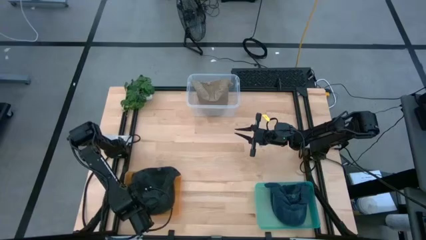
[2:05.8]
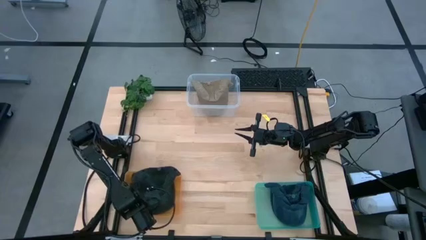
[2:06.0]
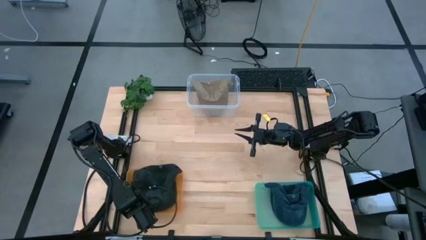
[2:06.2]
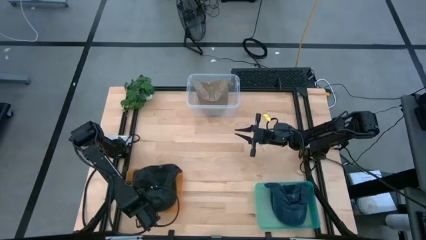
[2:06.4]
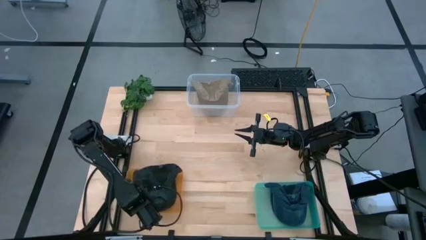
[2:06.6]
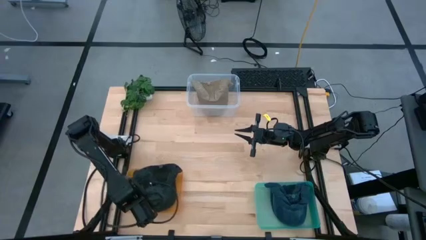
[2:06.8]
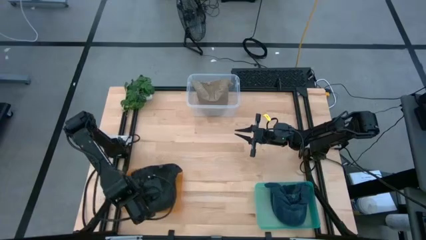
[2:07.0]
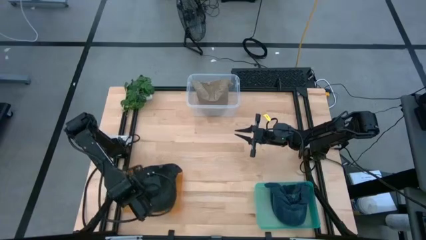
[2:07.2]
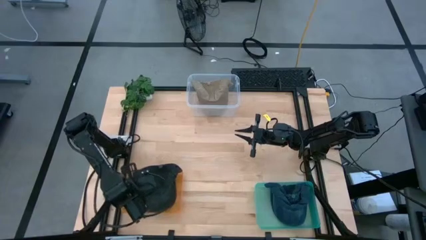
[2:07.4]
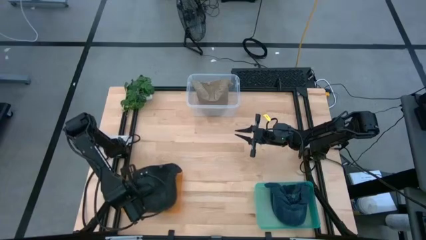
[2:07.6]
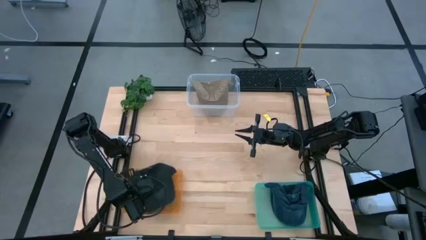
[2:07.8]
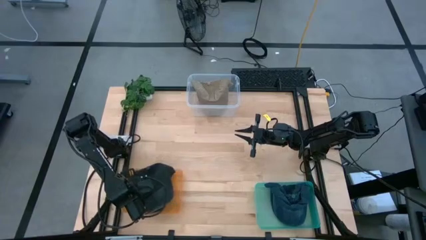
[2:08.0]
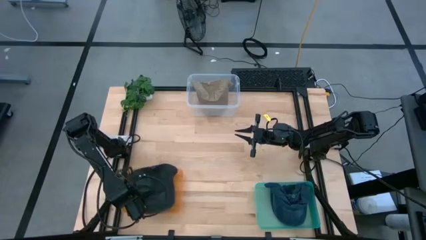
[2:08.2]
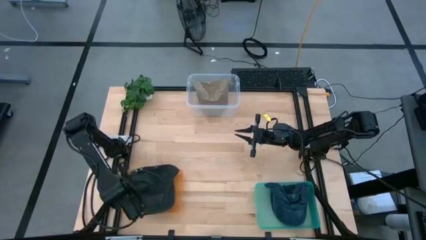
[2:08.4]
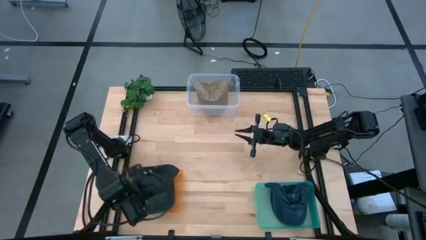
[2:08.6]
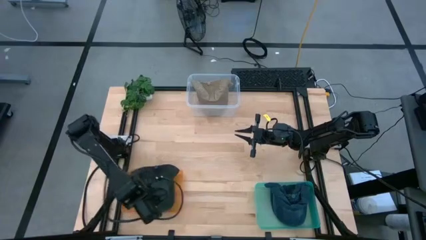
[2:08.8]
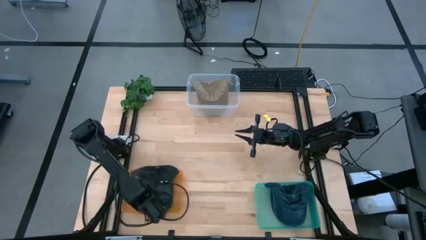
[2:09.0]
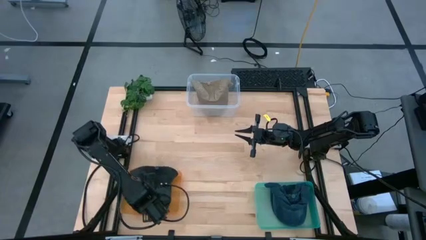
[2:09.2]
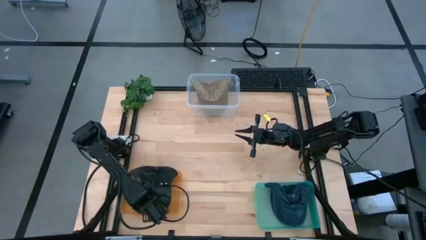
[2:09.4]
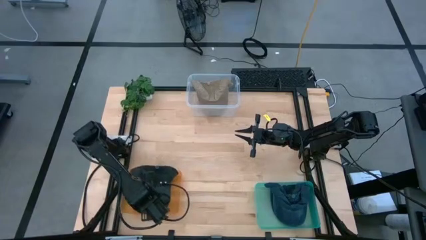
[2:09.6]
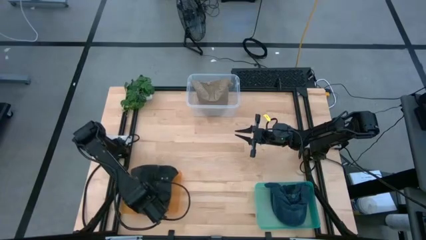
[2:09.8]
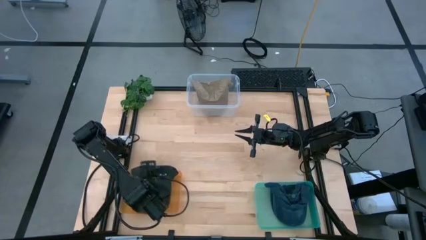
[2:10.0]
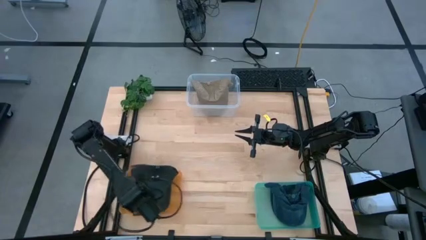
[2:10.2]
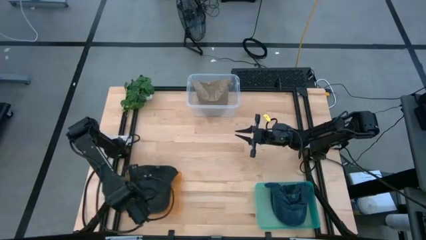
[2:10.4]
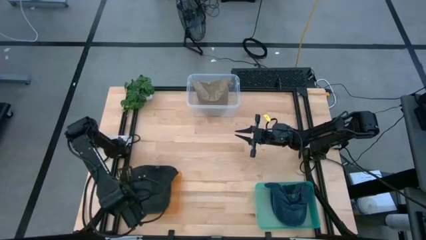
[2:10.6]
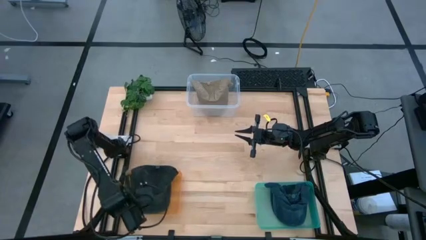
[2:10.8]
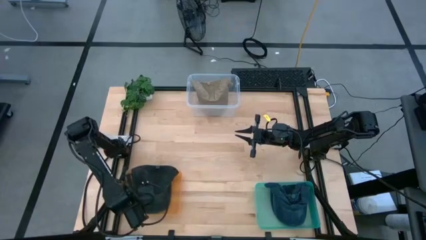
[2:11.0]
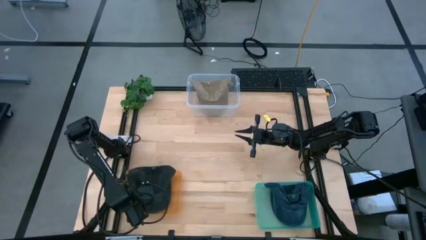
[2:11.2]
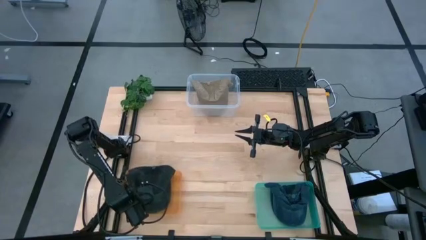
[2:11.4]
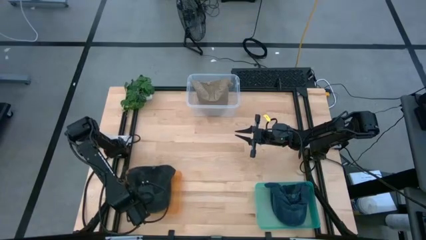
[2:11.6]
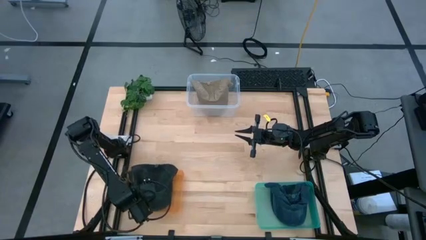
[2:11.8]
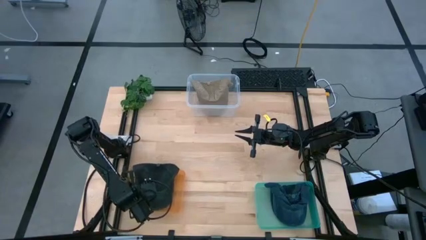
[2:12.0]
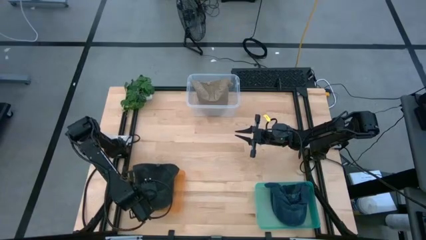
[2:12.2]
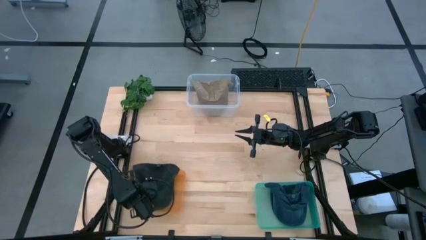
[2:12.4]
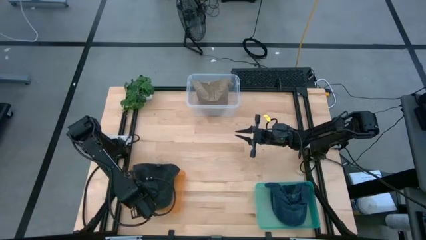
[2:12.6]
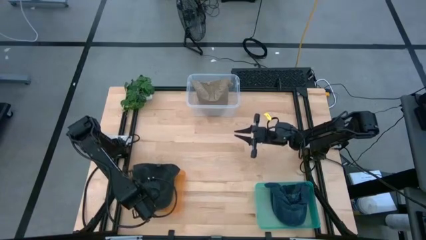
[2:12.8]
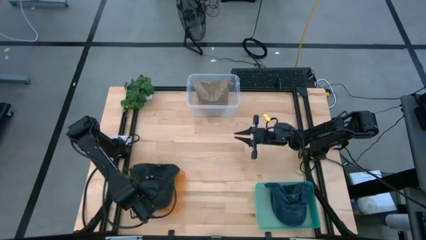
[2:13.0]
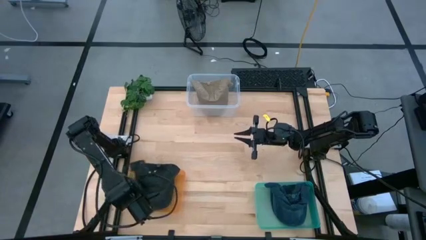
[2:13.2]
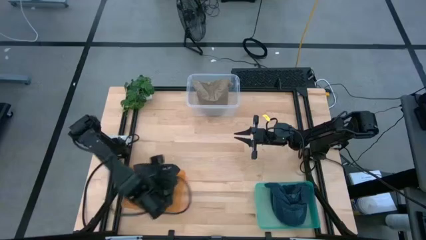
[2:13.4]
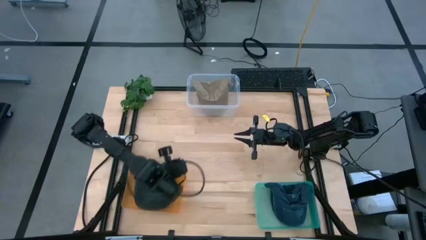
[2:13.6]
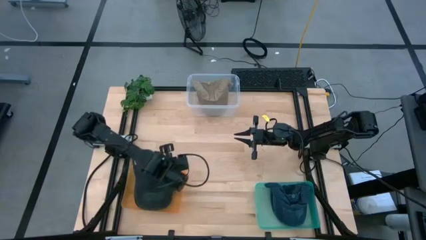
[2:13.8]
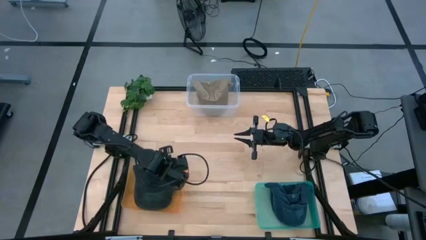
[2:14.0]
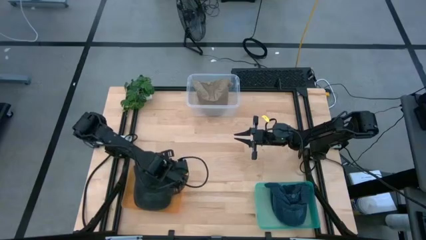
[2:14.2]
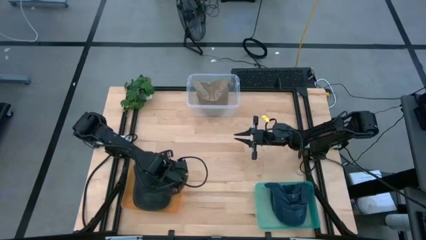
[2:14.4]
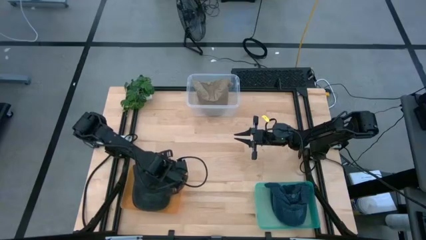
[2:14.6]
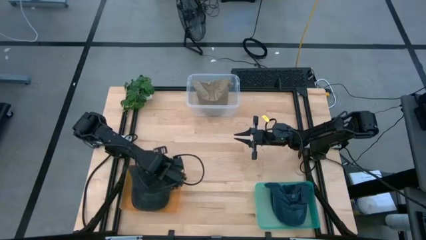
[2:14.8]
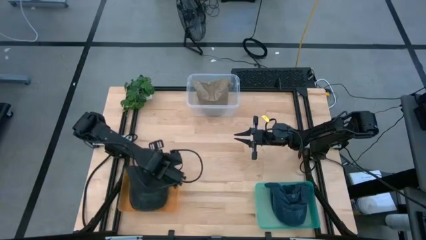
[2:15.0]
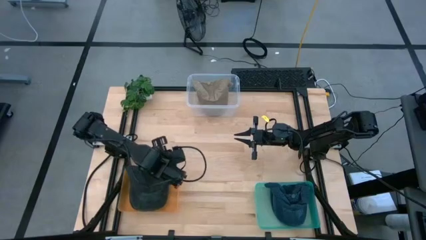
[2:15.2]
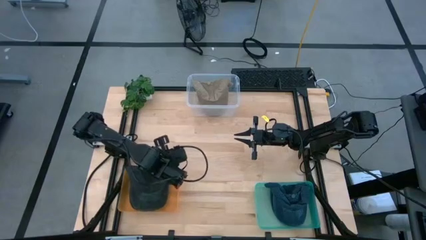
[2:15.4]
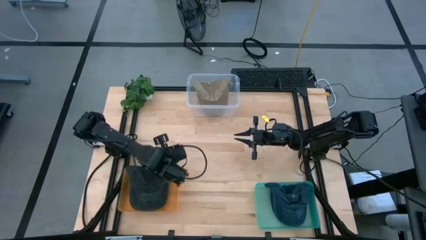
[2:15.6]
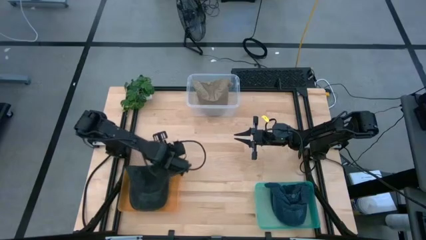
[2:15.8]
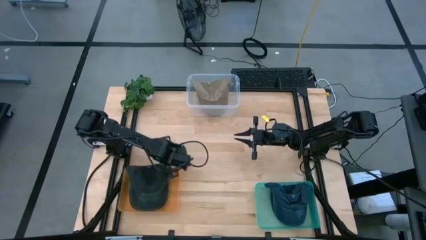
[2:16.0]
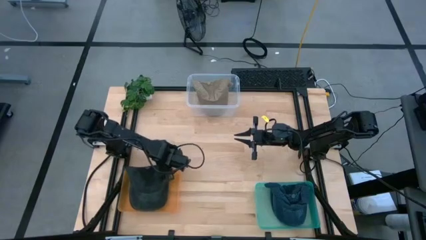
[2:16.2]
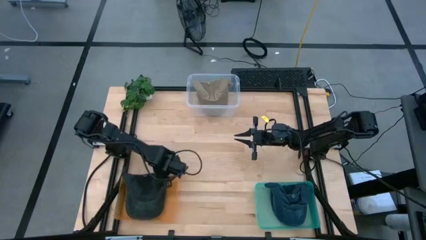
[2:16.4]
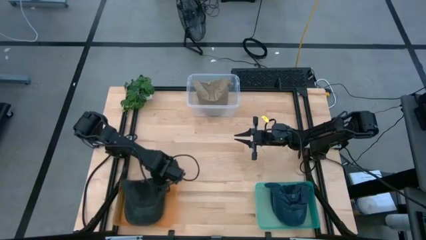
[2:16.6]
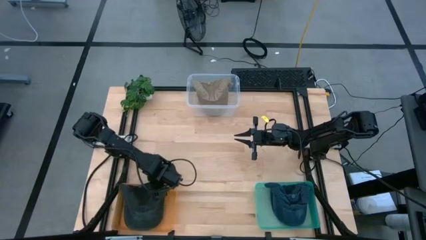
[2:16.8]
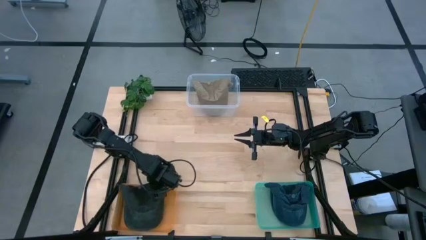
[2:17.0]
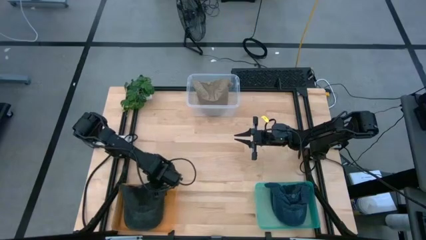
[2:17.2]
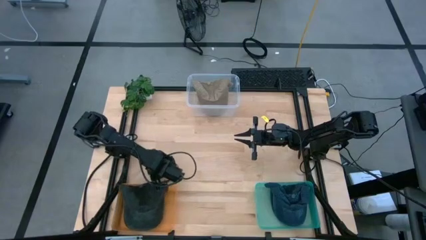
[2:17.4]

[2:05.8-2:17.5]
Task: Pick & Place hat
Put the black cap into the orange bin

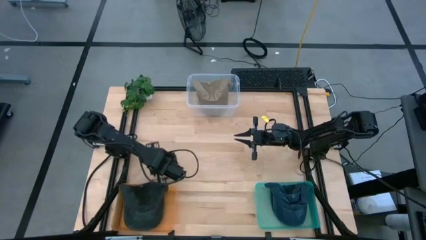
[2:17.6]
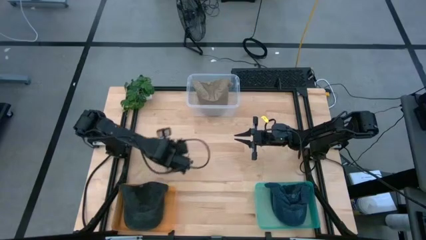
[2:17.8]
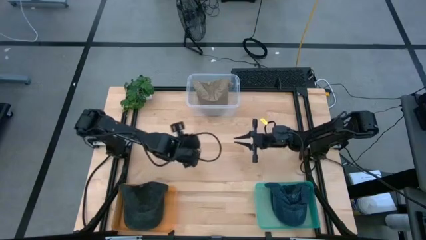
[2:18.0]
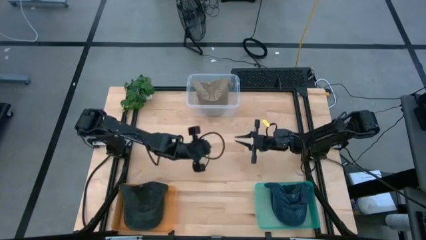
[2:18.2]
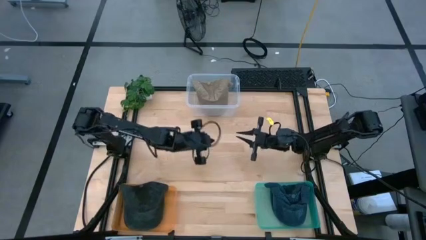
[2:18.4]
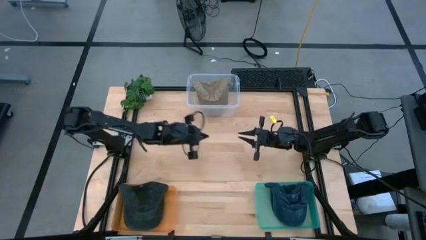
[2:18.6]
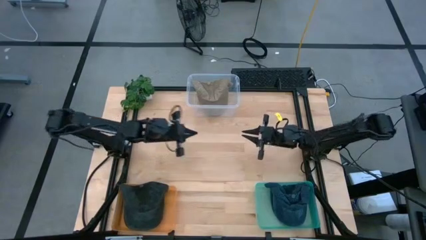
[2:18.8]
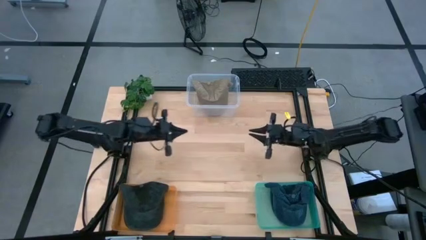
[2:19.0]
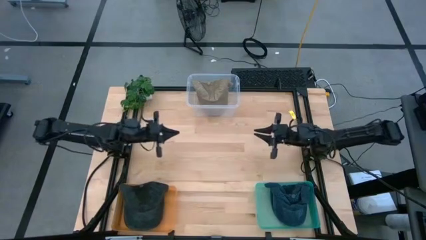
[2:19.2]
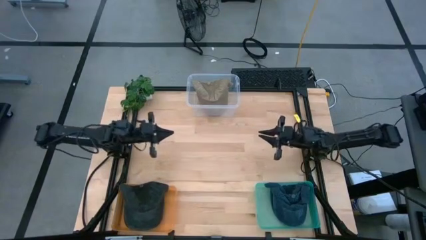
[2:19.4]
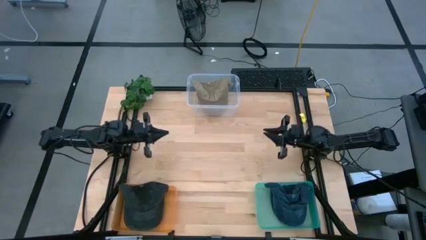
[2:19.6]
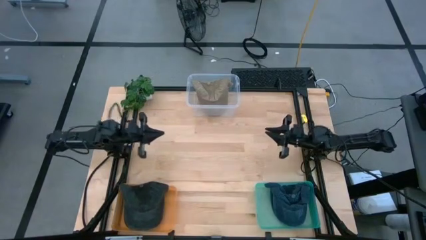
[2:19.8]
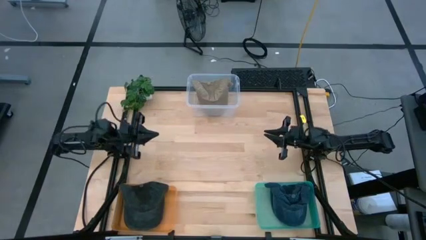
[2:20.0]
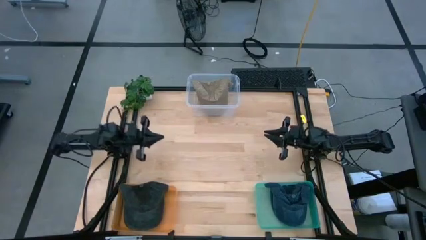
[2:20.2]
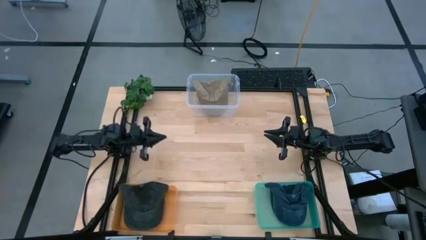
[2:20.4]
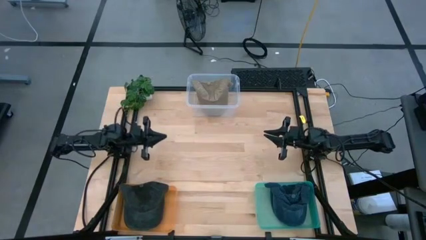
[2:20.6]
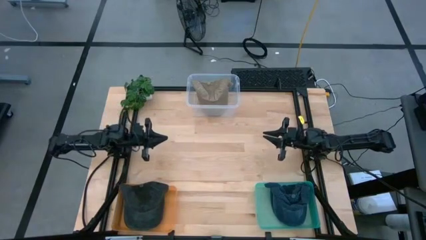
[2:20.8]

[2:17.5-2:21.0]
Return to Home Position

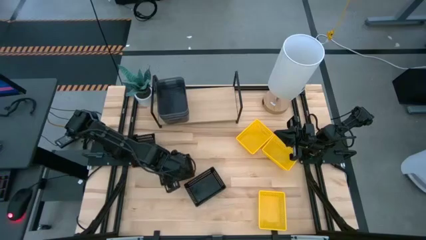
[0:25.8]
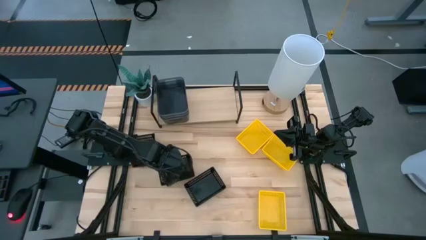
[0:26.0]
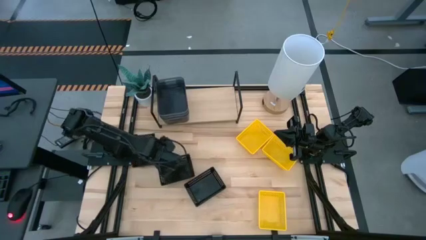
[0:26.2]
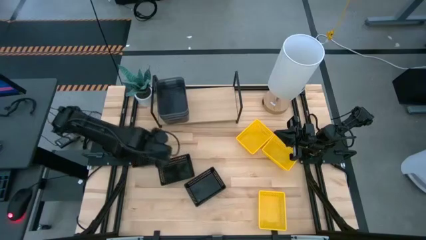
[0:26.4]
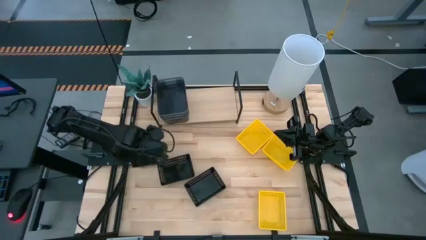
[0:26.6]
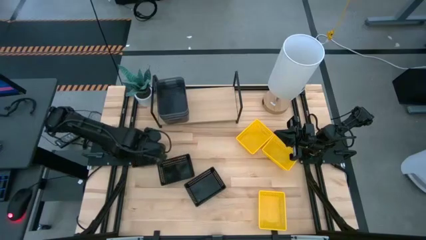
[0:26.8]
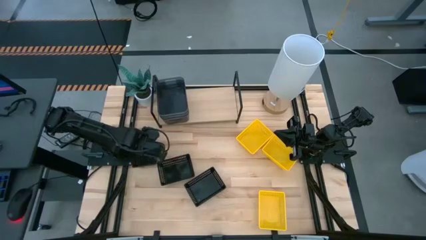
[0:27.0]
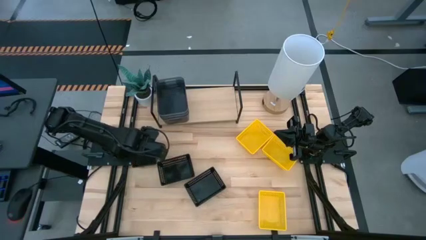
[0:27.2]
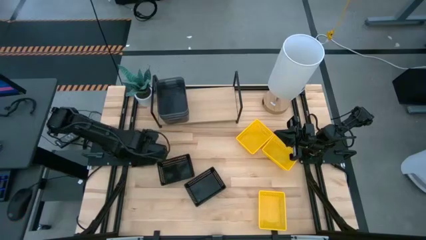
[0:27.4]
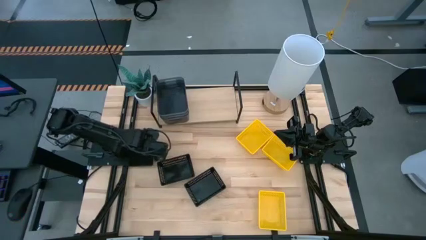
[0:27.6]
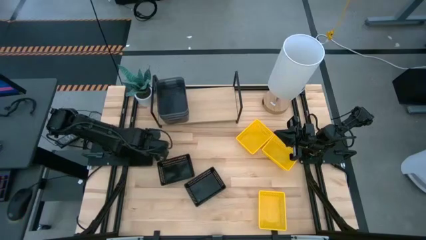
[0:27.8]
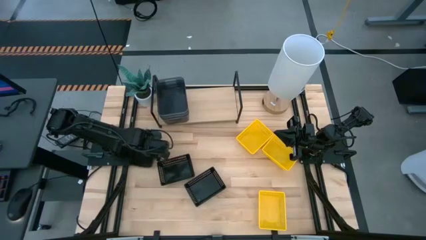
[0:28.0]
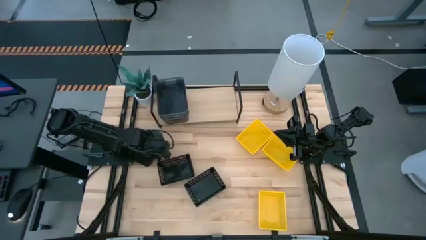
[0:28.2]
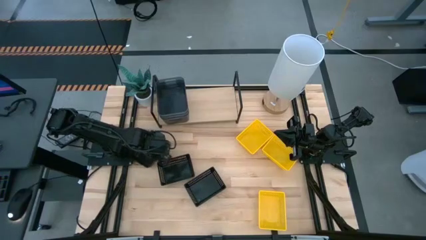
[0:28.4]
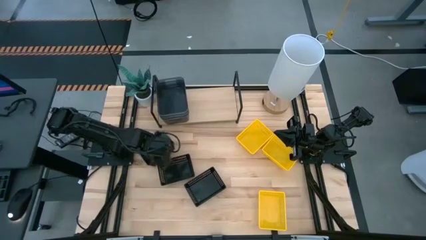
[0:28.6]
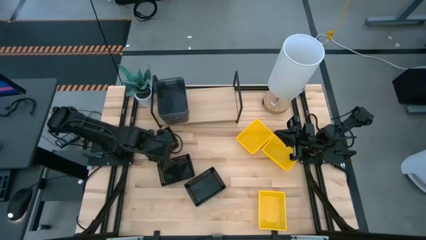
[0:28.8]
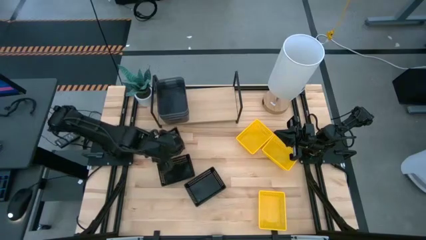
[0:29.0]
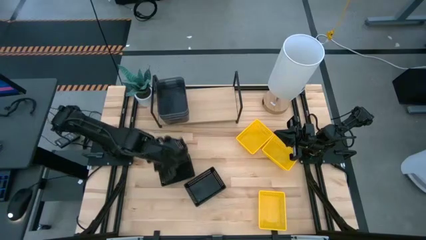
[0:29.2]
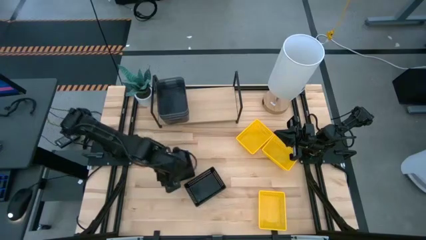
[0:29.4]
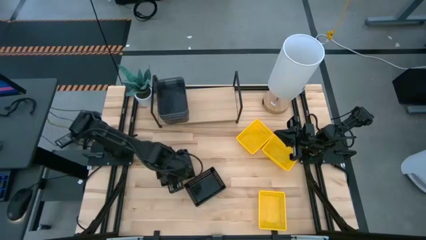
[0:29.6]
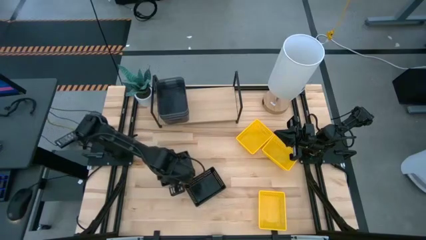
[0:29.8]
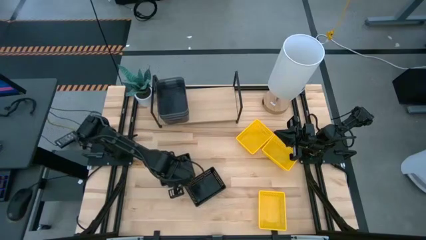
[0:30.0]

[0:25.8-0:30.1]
Task: Stack baskets on shelf by color
Stack the top black basket on top of the middle black basket
